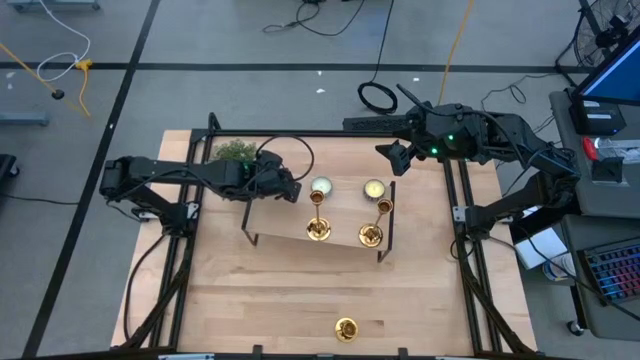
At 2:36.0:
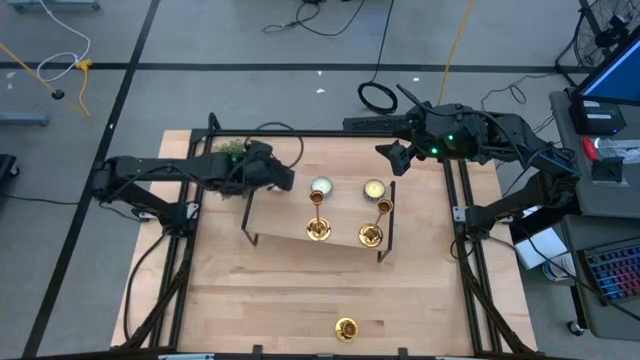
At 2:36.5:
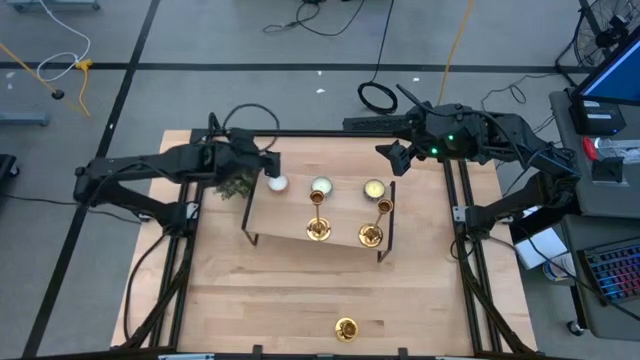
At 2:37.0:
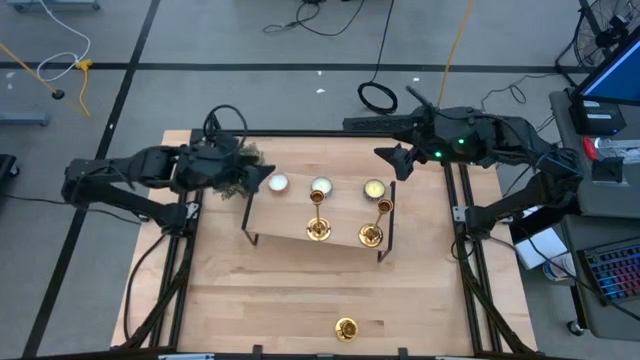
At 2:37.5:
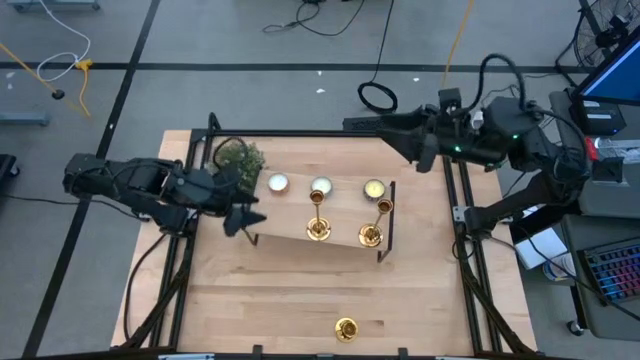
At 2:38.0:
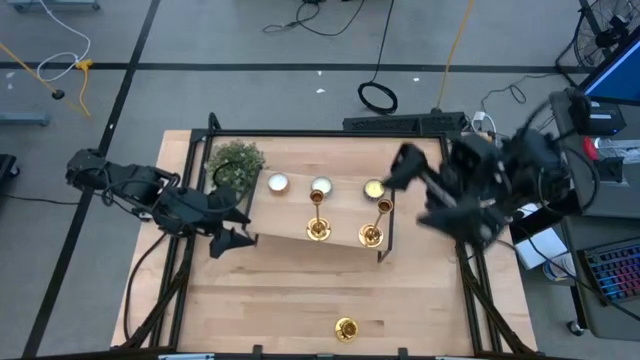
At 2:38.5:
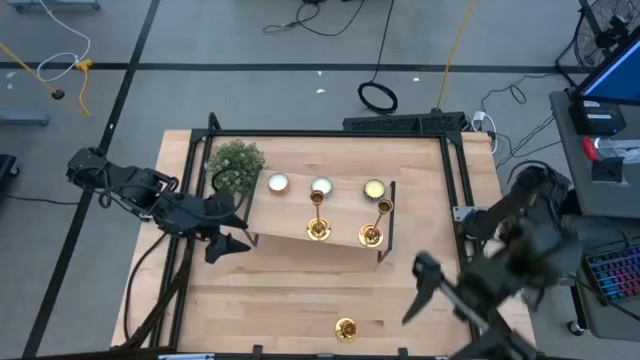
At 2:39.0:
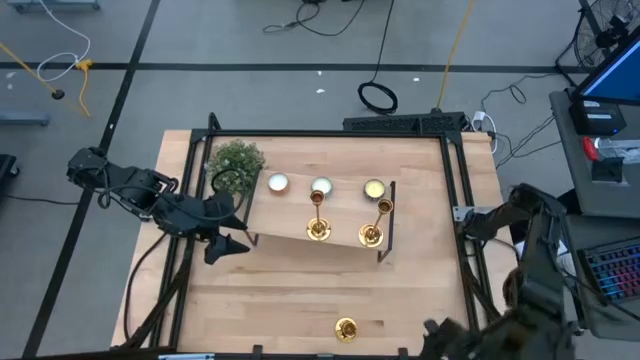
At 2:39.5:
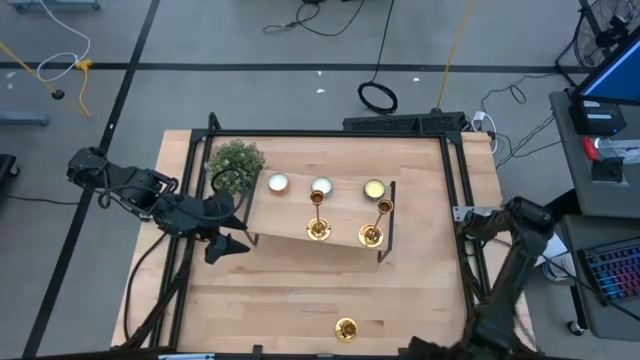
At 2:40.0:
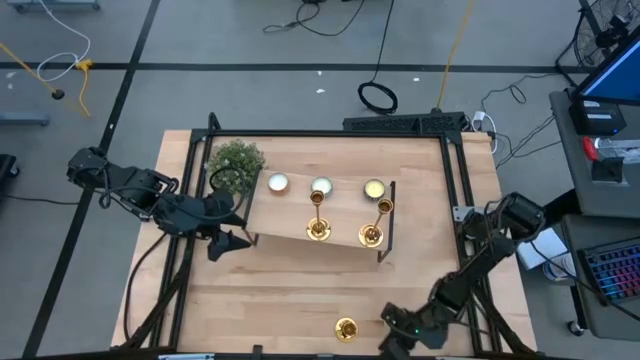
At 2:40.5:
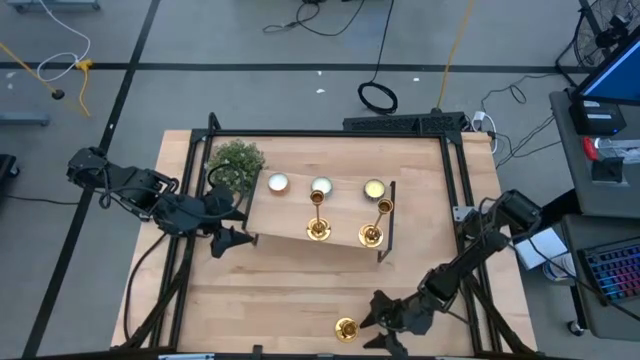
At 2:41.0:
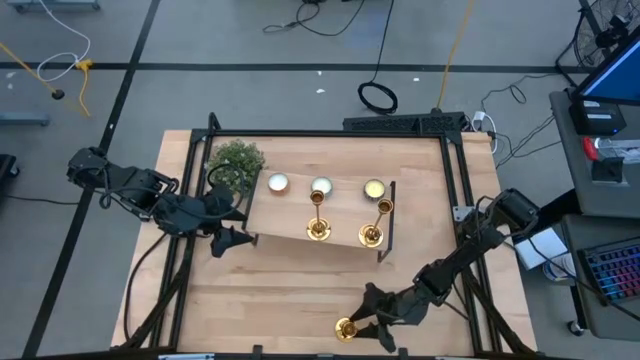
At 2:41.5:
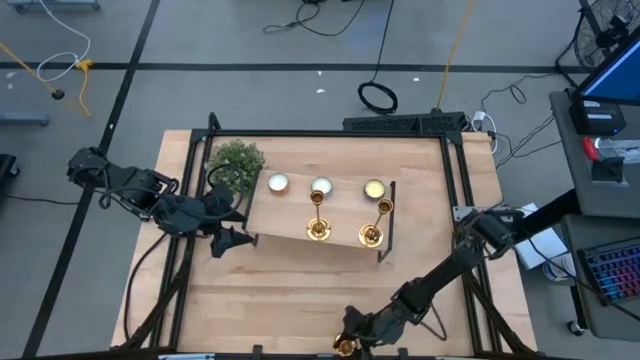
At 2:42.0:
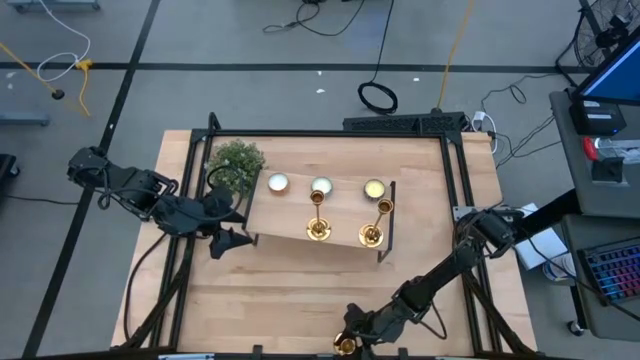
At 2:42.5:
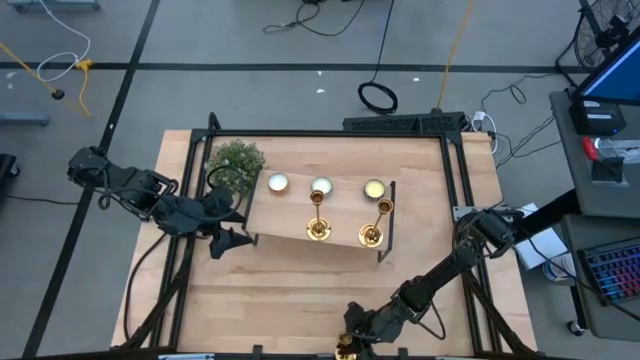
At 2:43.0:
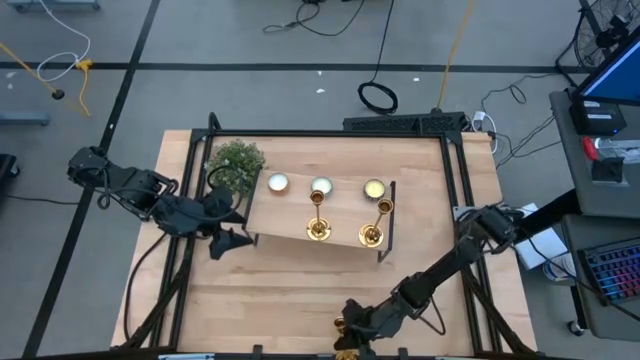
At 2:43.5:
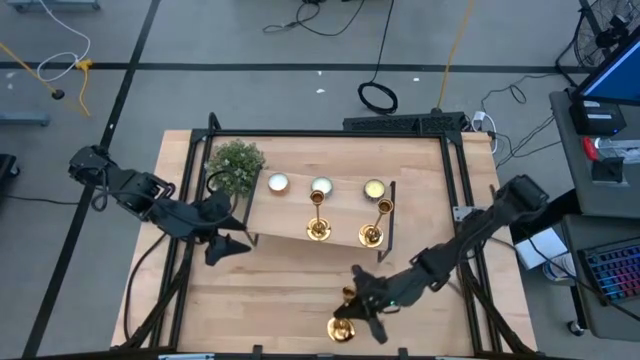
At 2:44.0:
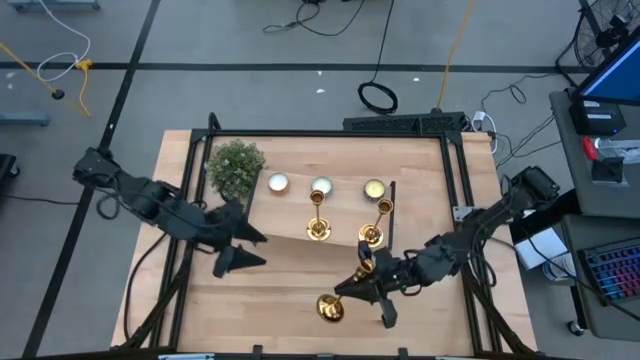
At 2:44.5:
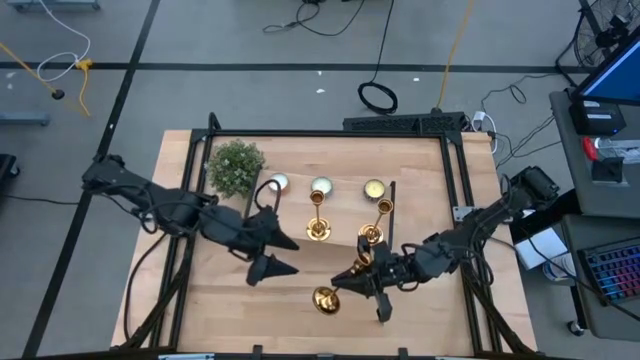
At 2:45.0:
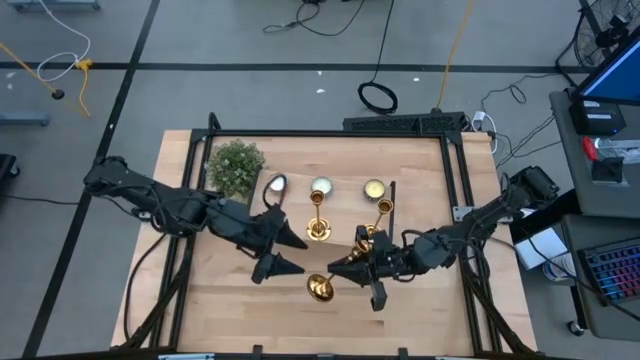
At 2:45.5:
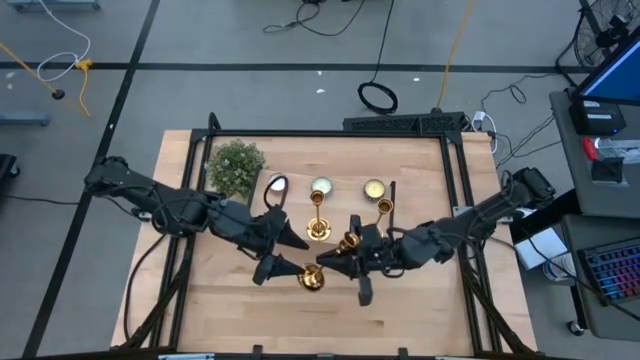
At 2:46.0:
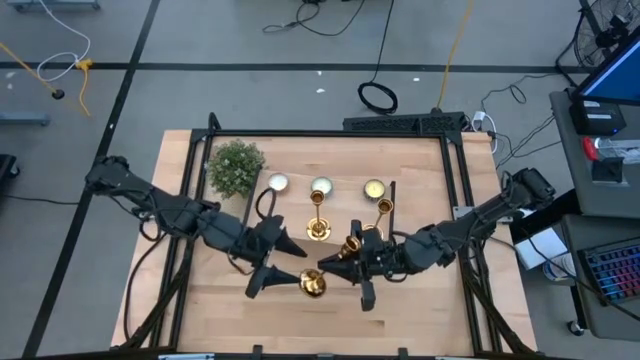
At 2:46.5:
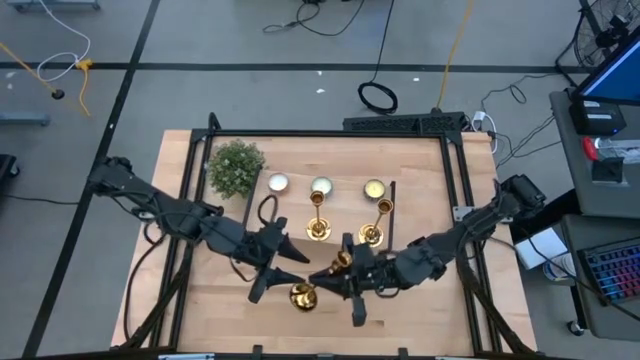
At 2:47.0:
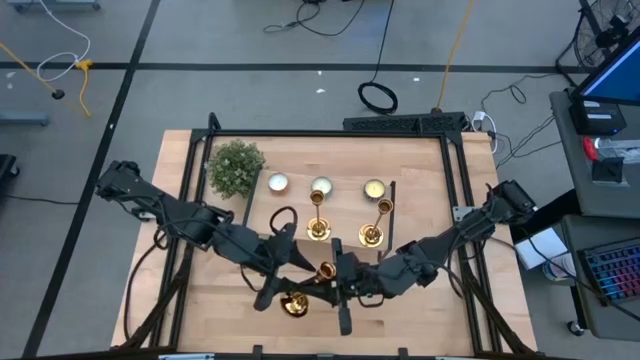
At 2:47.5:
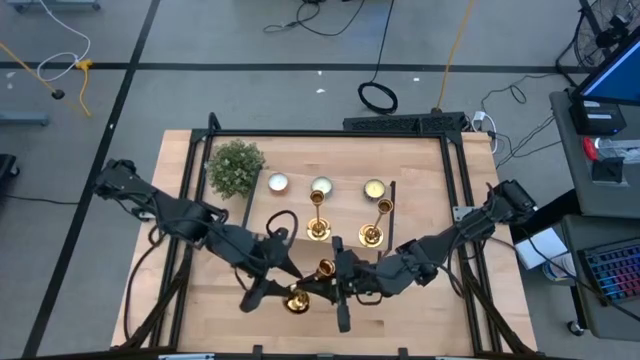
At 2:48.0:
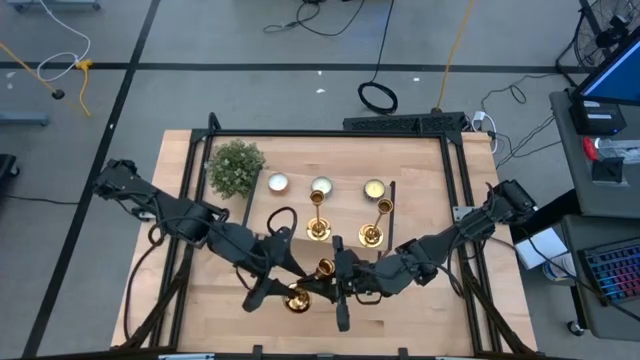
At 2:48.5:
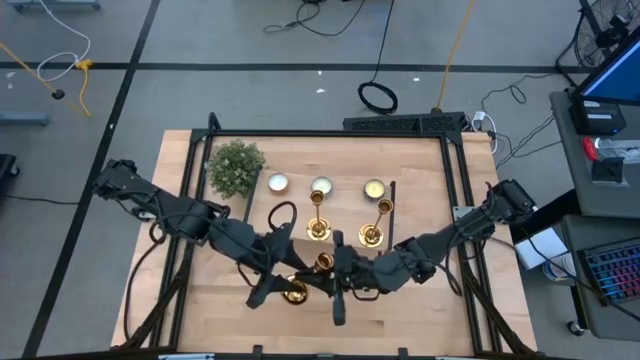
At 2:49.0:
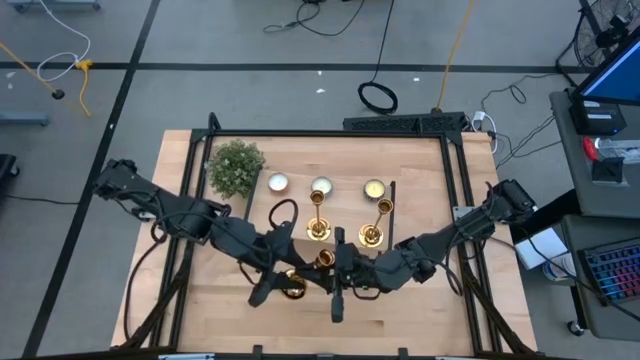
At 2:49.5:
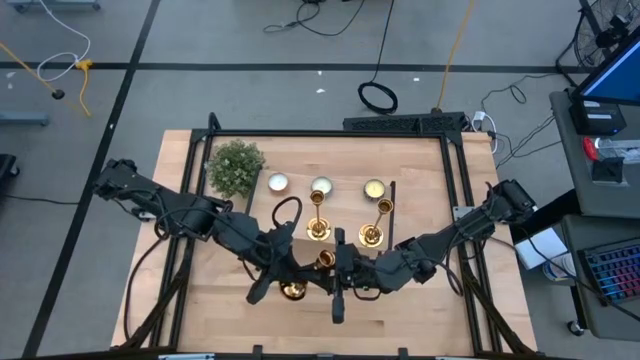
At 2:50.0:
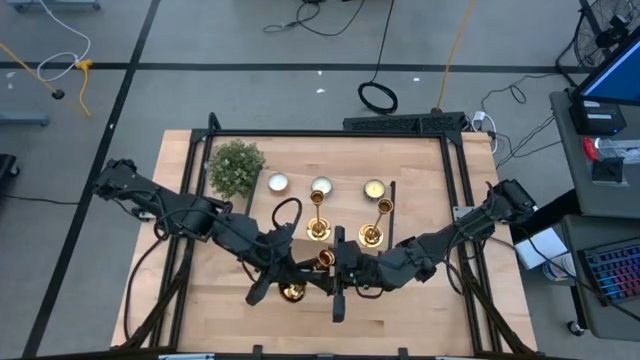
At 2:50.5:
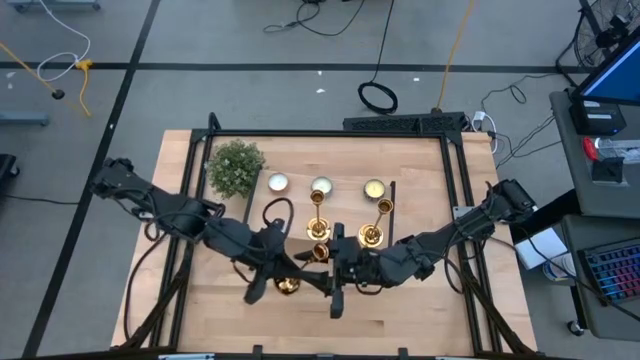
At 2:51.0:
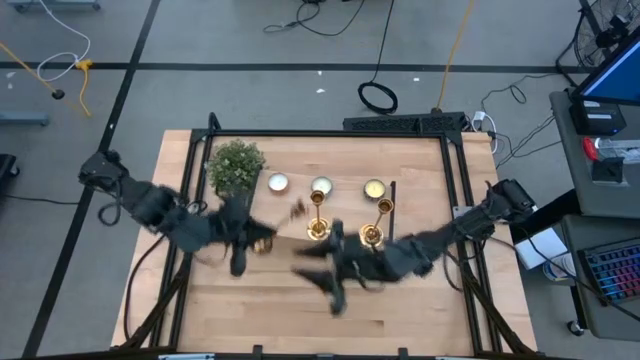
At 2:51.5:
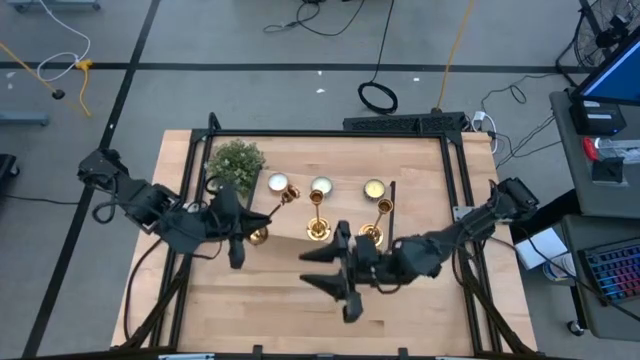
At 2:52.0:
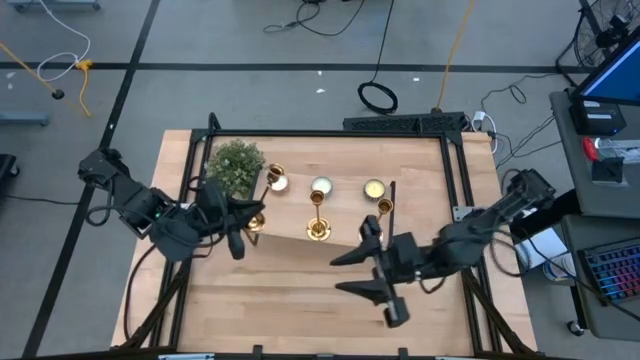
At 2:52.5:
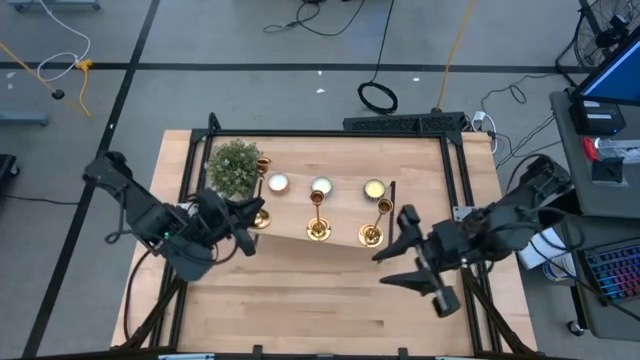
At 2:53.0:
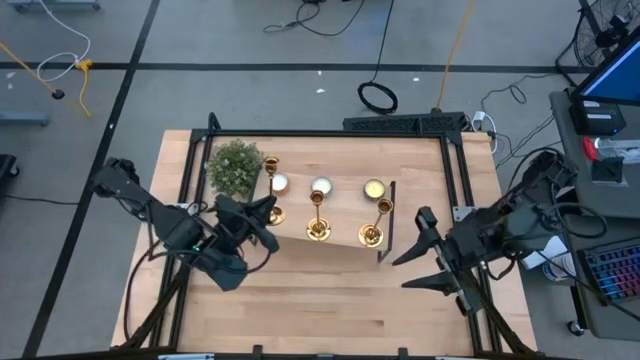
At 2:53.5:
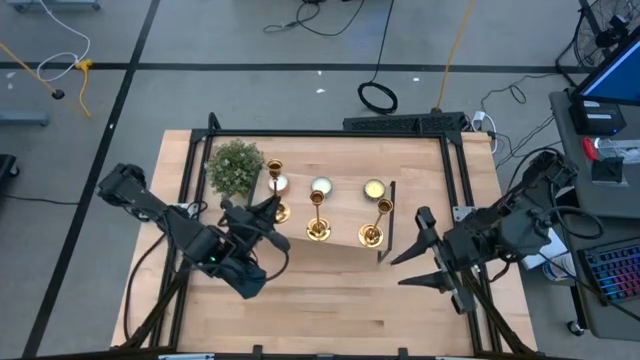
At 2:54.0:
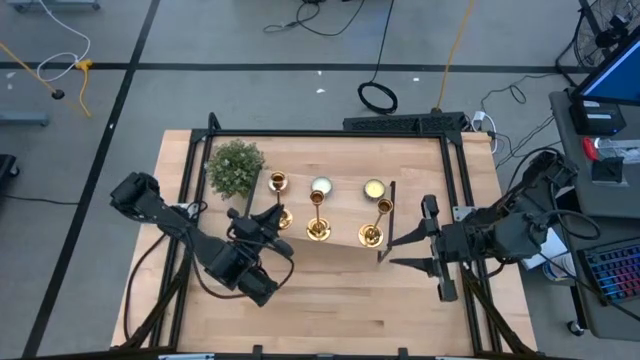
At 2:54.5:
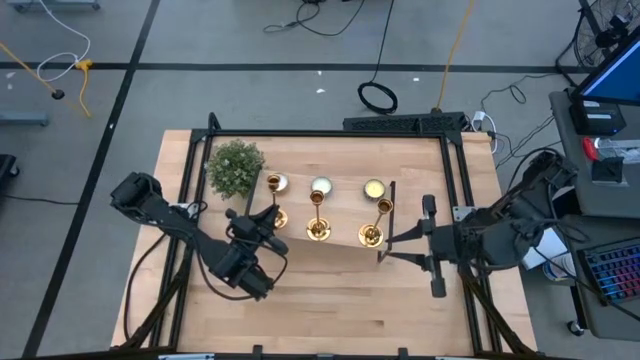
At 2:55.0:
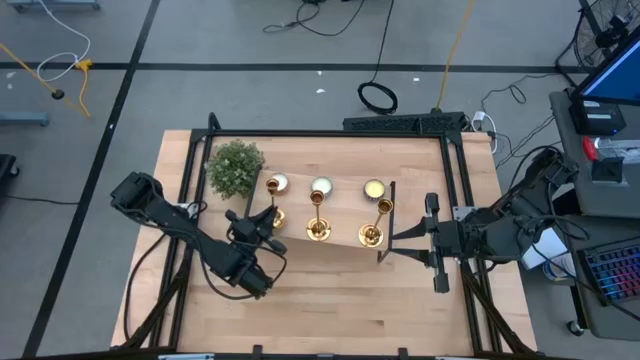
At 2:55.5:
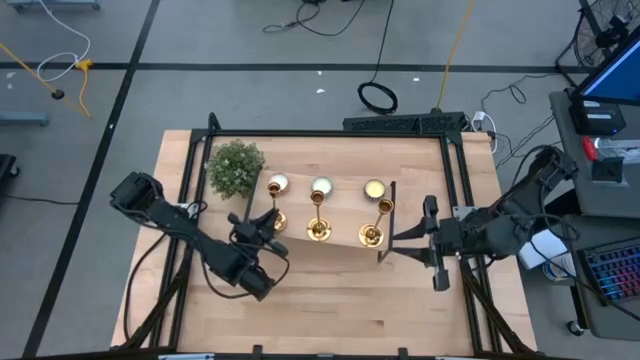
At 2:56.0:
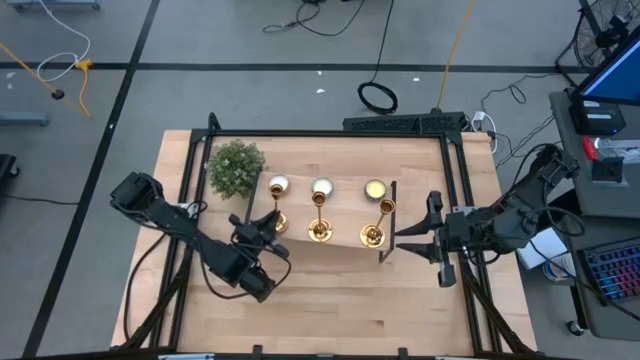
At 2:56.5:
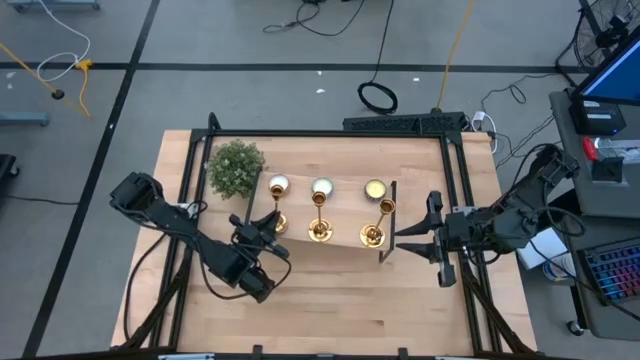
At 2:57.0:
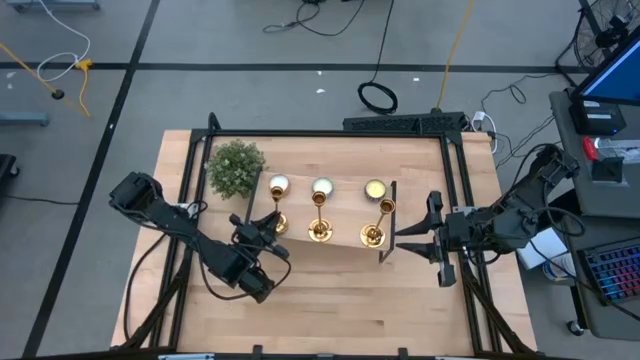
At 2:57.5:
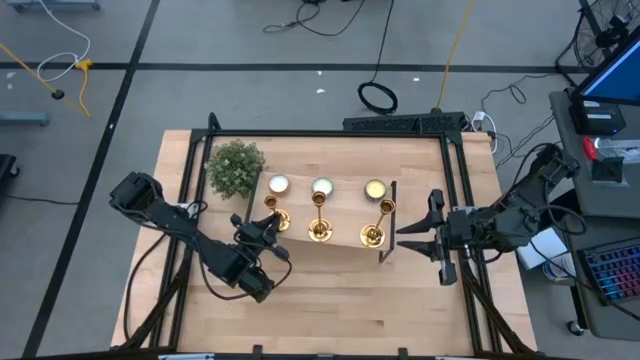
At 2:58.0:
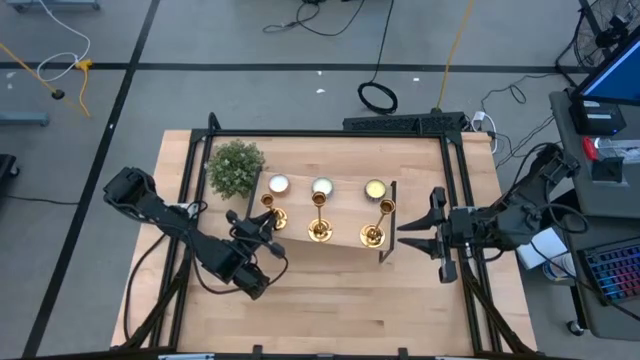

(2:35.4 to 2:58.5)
Task: Pick & Place candle stick holders
Put the gold candle holder on the shelf
